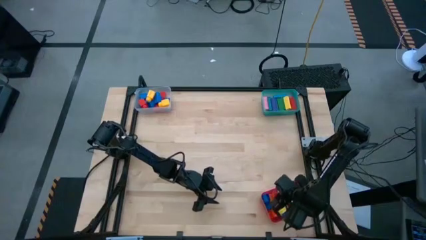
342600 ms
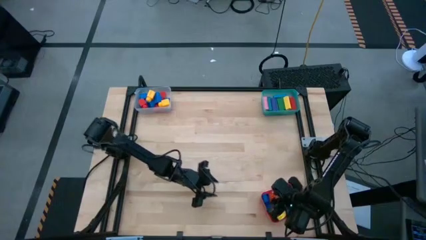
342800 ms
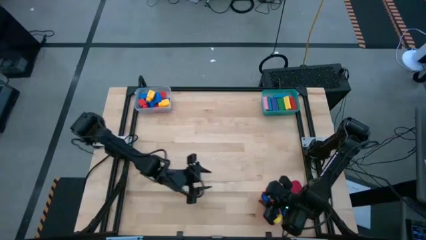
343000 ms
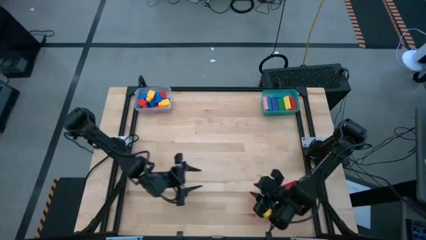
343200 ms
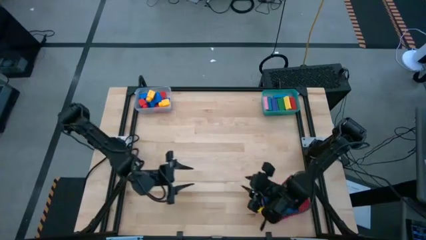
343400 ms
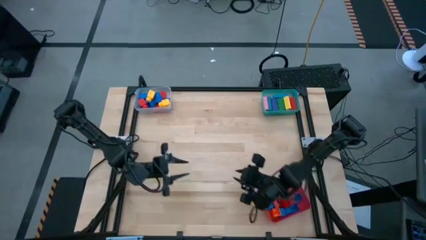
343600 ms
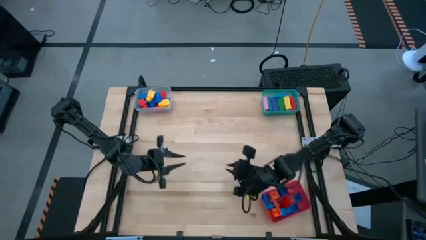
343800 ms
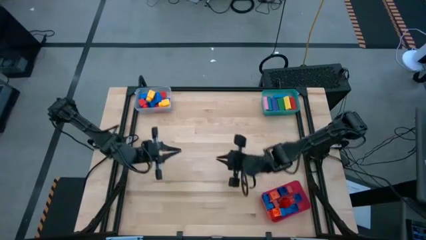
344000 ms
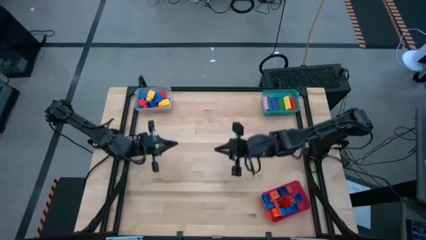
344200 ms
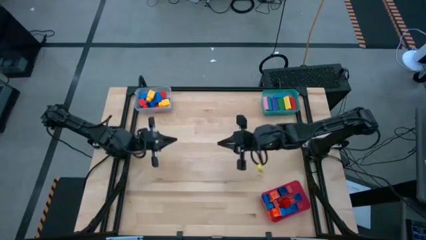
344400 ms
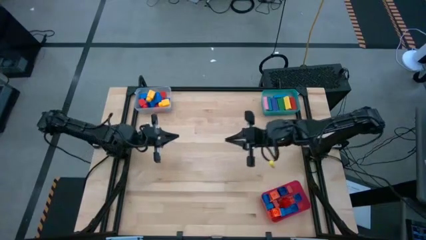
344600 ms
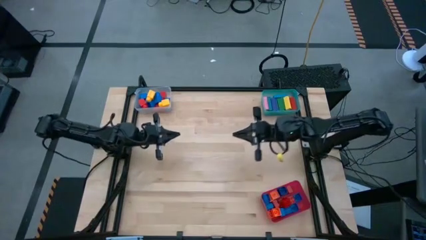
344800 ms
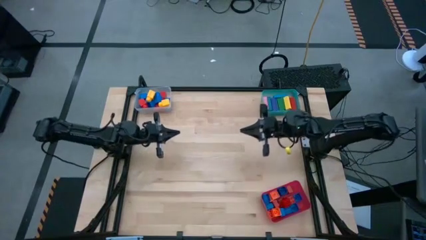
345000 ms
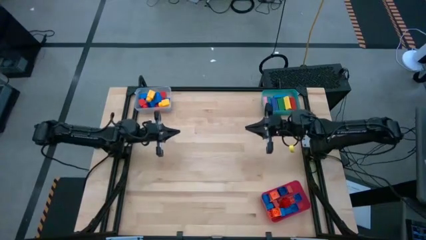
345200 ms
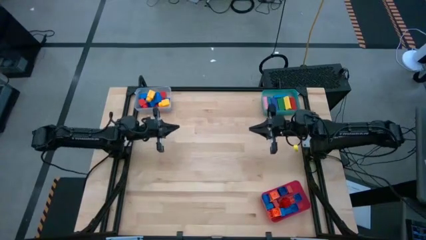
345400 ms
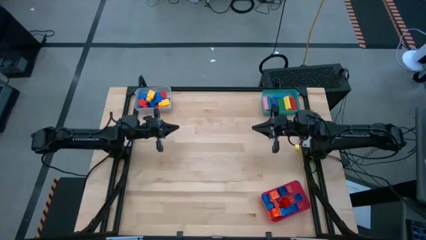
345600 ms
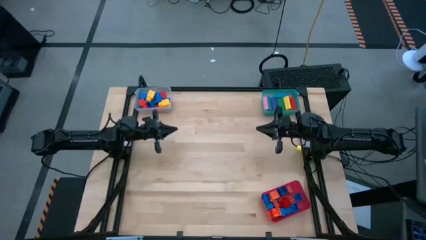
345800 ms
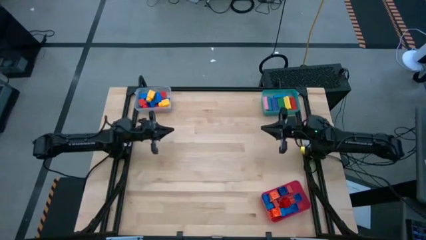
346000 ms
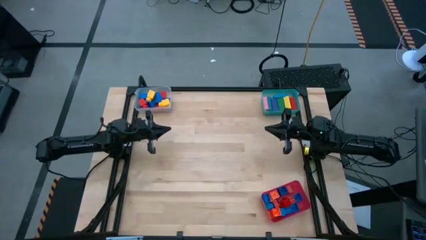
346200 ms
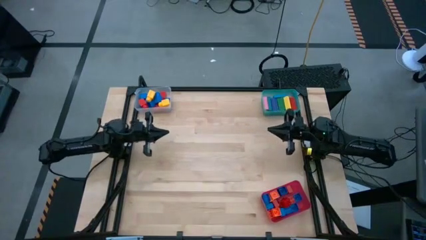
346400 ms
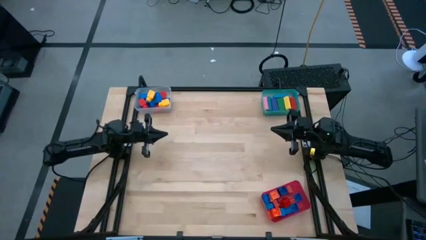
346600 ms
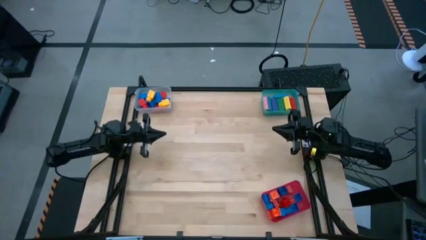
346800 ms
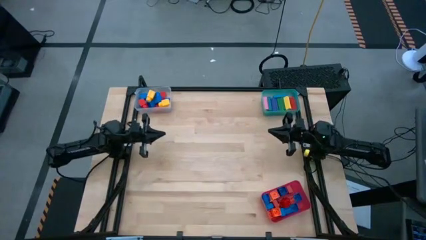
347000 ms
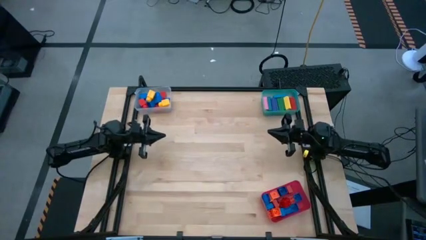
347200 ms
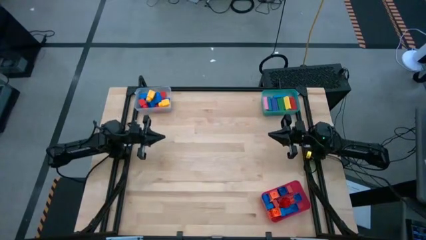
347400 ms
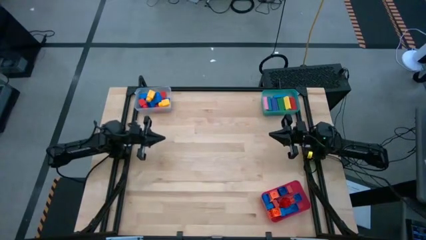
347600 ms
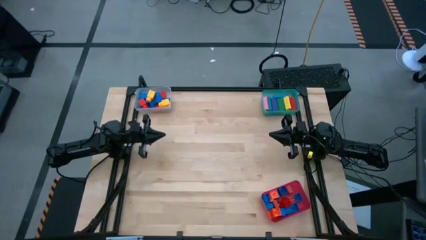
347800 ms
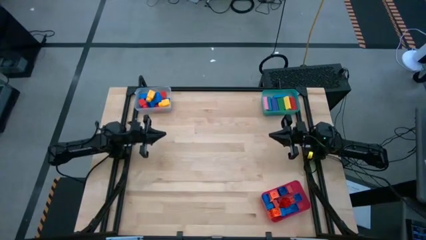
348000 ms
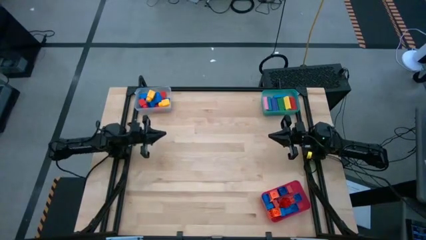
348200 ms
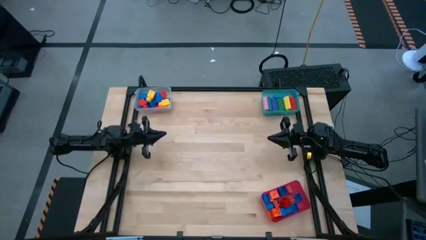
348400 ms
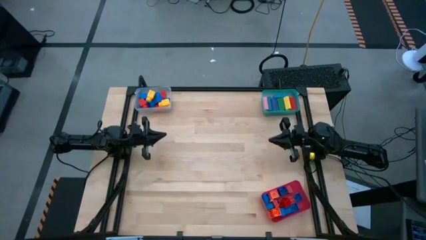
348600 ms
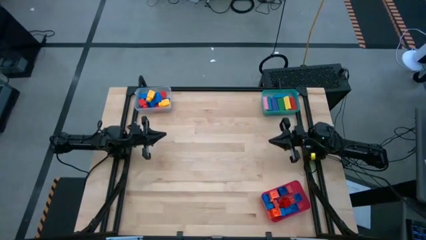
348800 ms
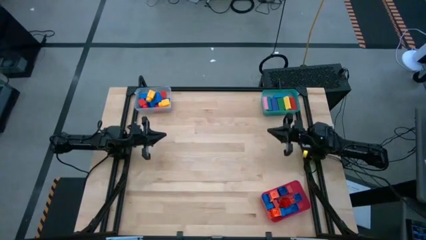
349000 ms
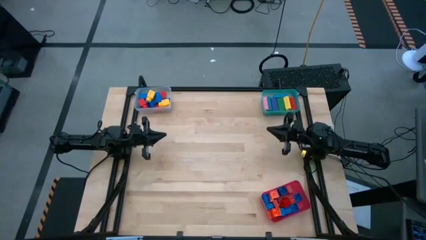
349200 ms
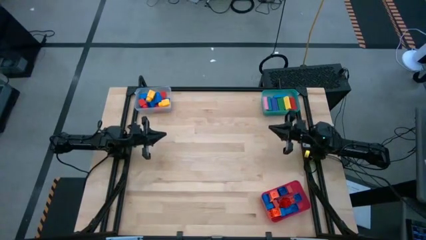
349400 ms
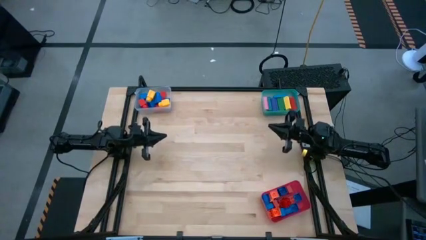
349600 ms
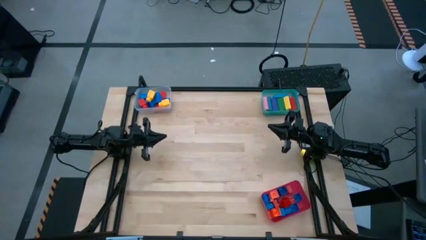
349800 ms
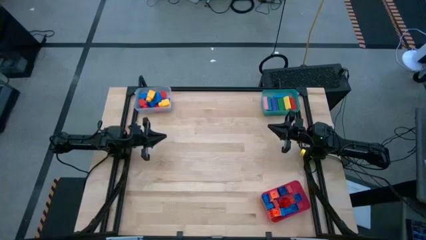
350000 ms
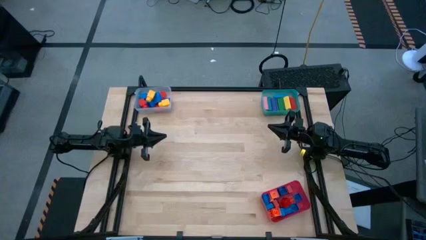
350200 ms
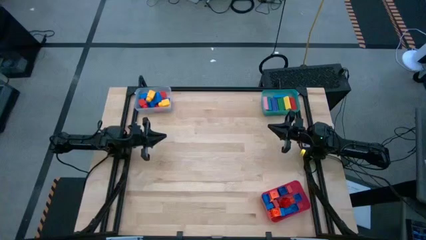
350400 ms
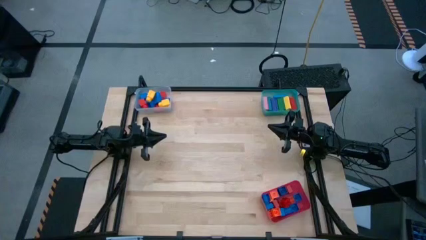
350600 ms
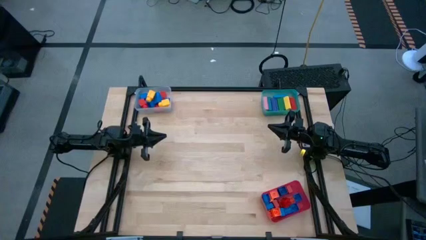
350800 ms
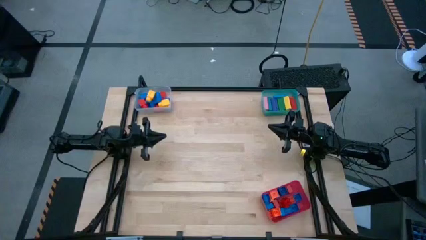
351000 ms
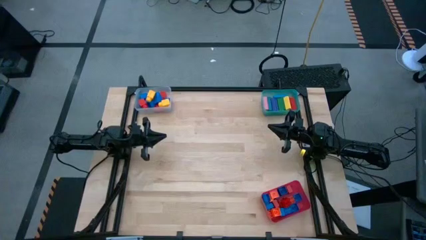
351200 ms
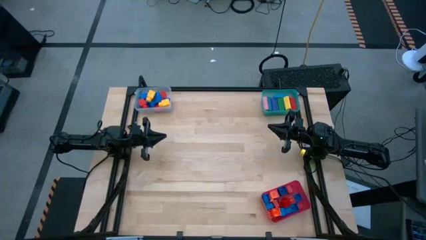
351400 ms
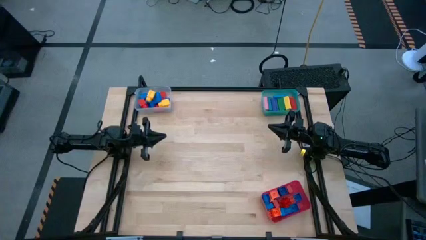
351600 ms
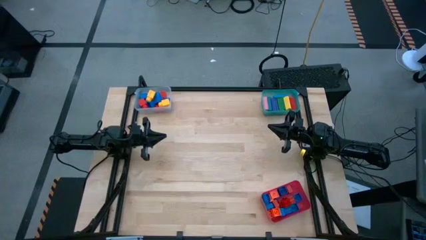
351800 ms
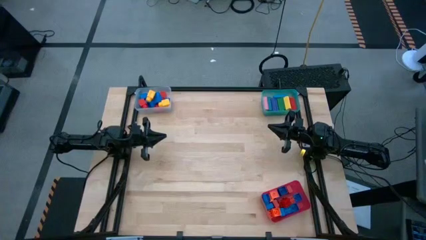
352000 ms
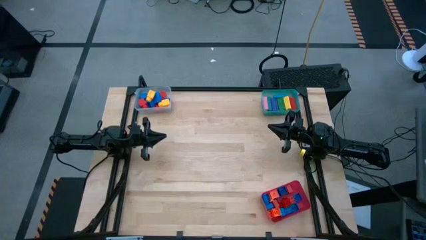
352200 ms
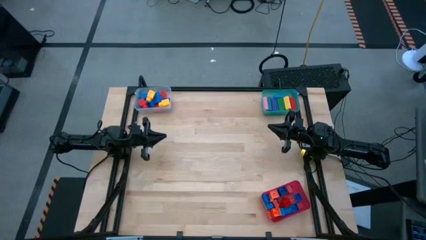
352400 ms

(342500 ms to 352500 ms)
Task: Sort blocks by size
Return to Home Position

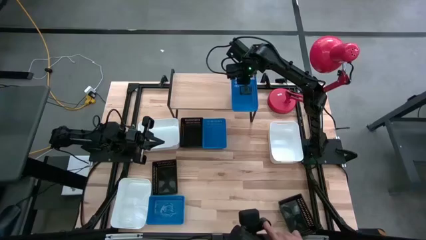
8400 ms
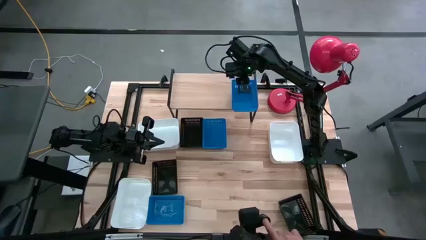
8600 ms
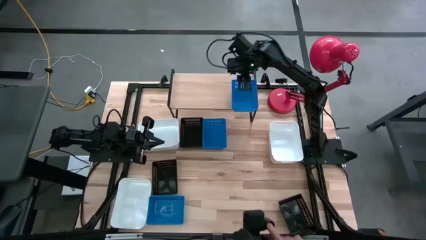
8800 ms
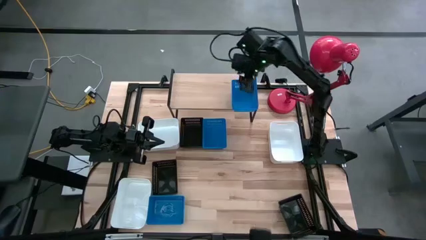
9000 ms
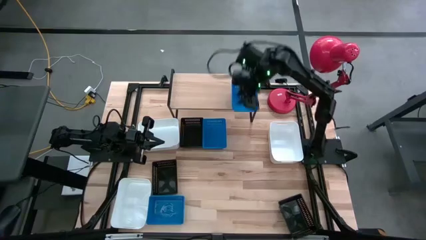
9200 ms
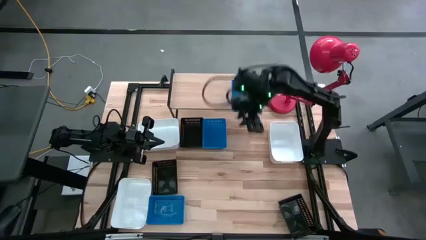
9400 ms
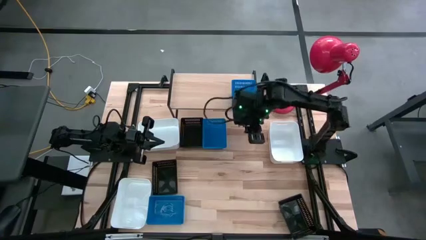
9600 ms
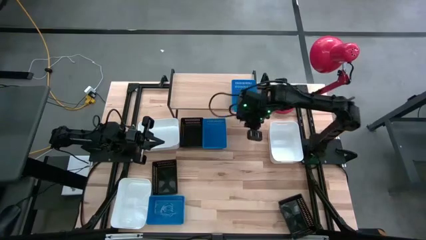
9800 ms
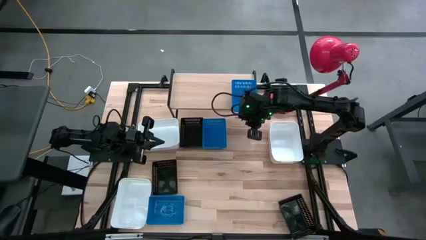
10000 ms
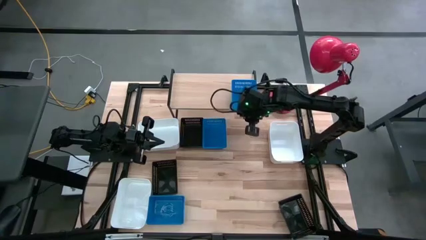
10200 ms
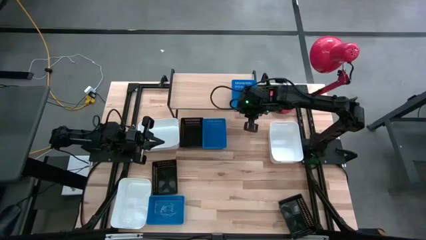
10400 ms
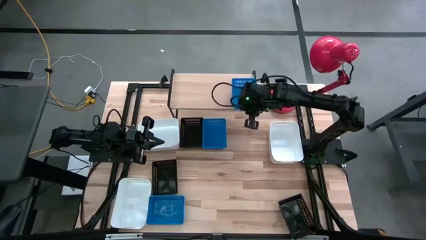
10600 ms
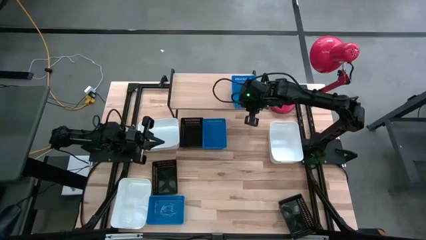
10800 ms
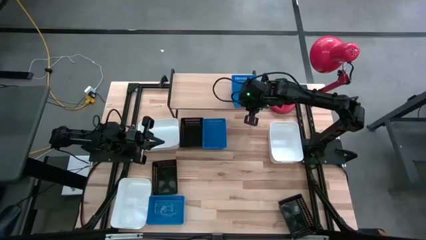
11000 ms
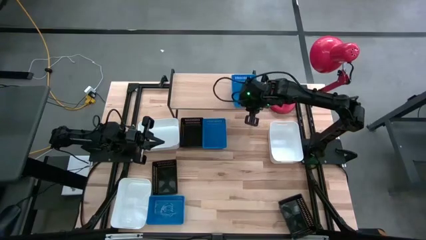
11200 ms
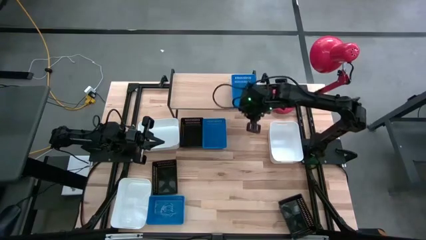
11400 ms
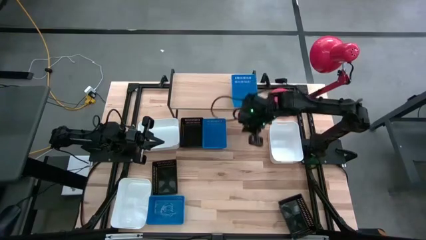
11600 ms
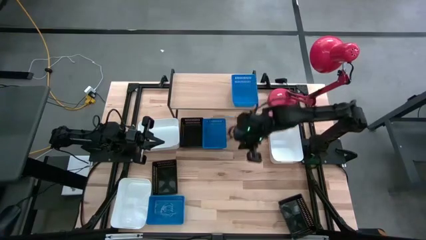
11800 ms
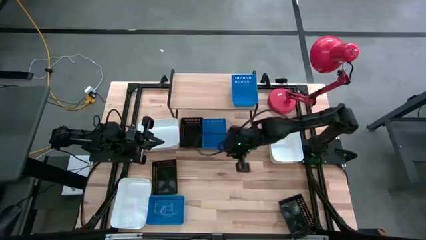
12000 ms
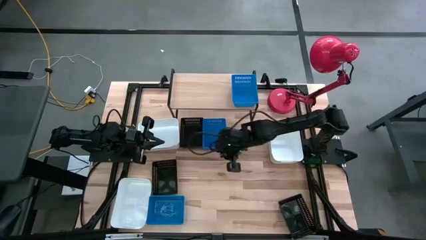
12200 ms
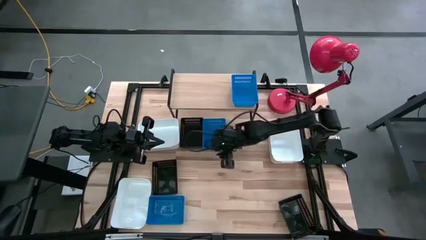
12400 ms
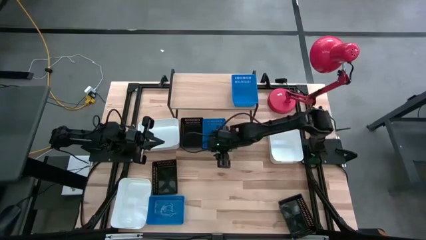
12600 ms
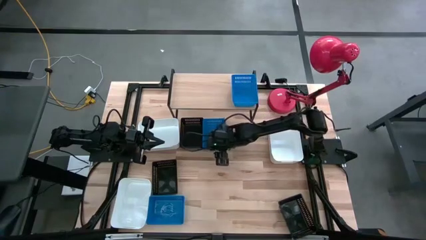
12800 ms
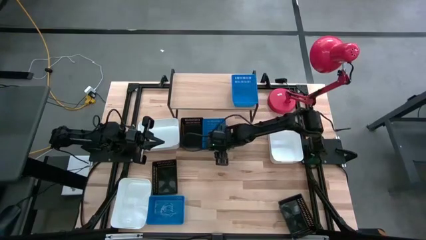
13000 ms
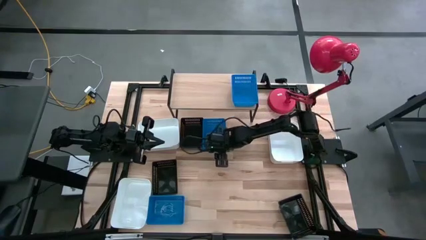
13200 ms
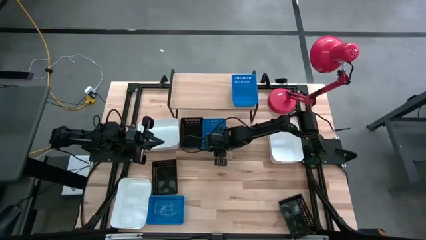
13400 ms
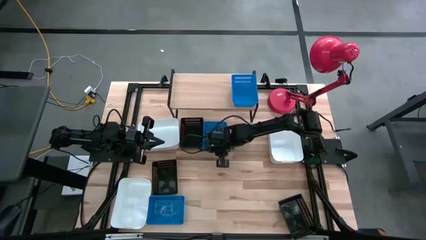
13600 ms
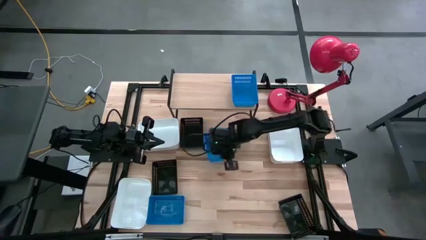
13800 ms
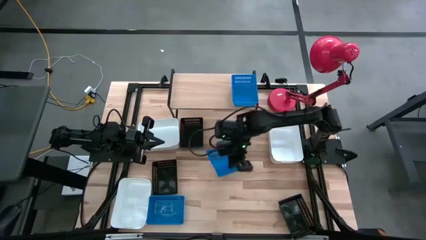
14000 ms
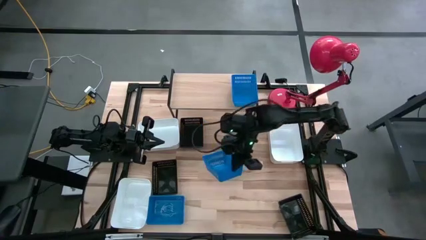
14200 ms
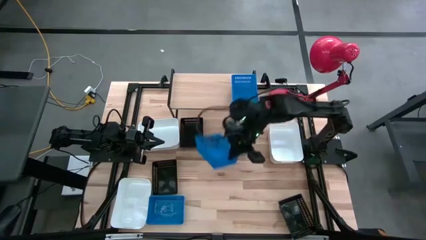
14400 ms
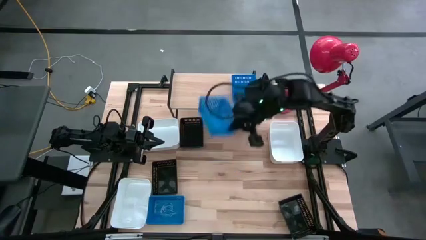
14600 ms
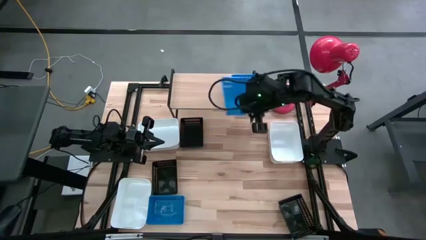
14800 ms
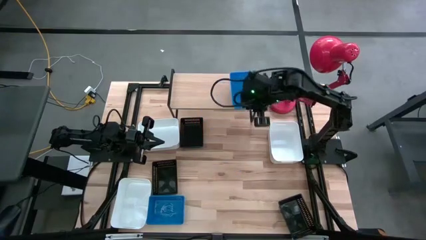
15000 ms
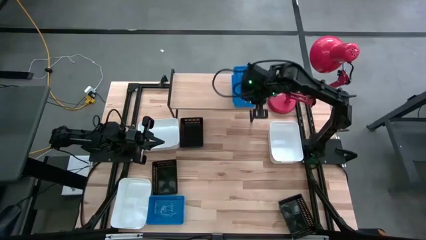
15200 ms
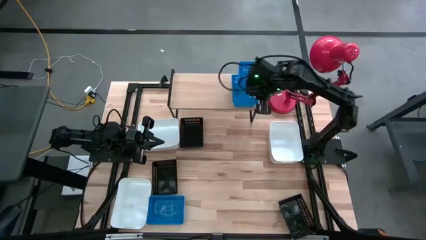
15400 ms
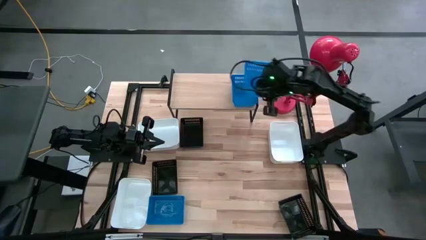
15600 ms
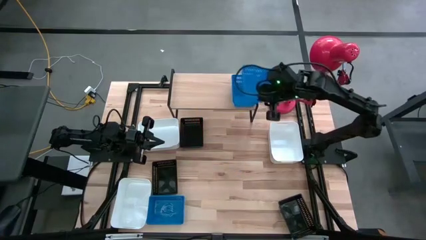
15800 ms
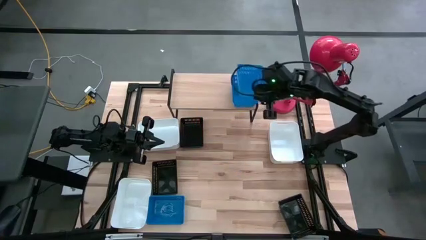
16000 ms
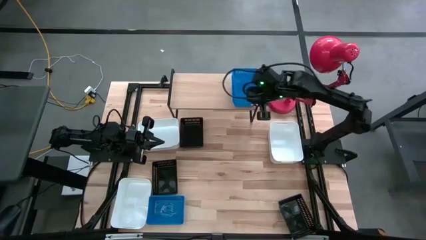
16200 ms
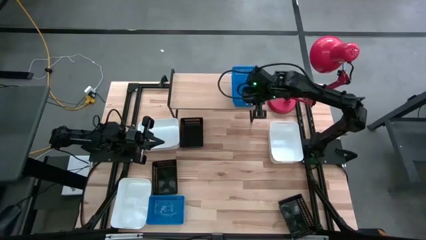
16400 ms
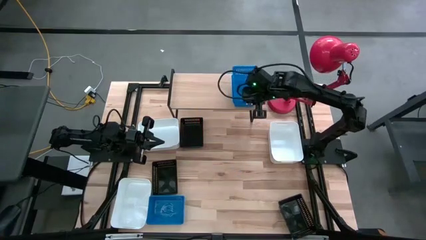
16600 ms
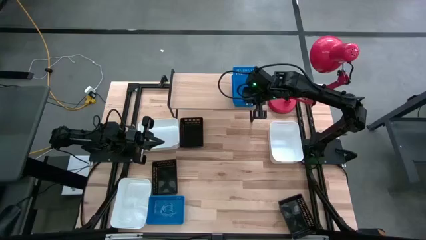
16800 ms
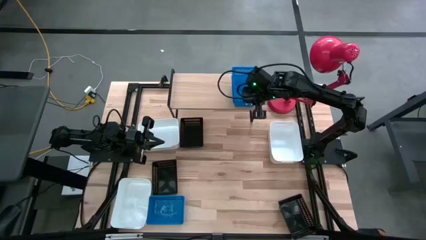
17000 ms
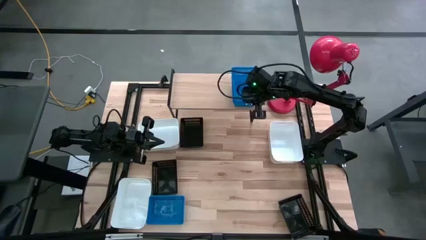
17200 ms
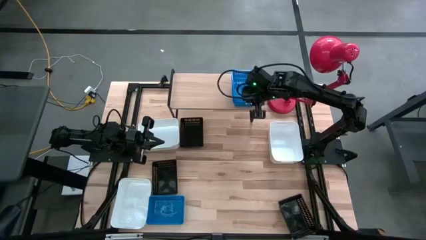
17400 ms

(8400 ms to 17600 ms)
Task: Stack baskets on shelf by color
Stack the top blue bin on top of the blue bin on the shelf
